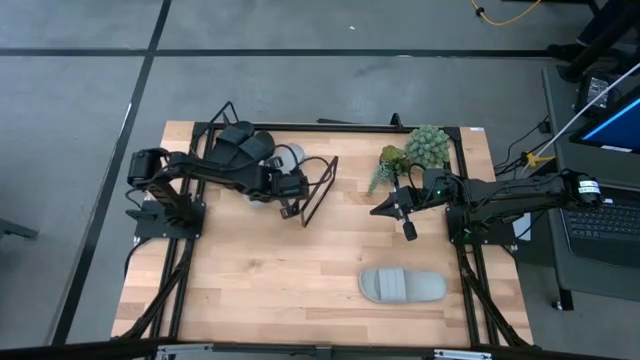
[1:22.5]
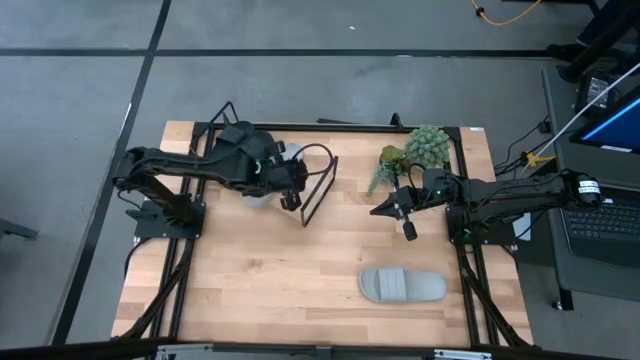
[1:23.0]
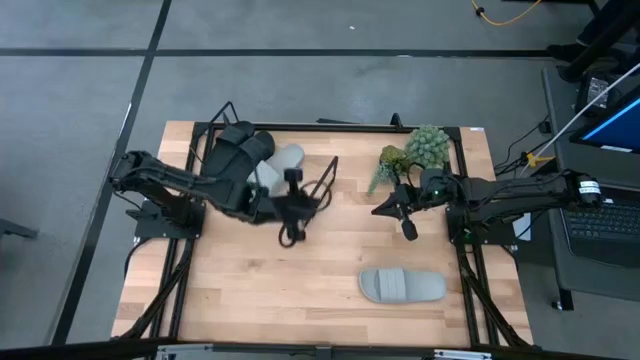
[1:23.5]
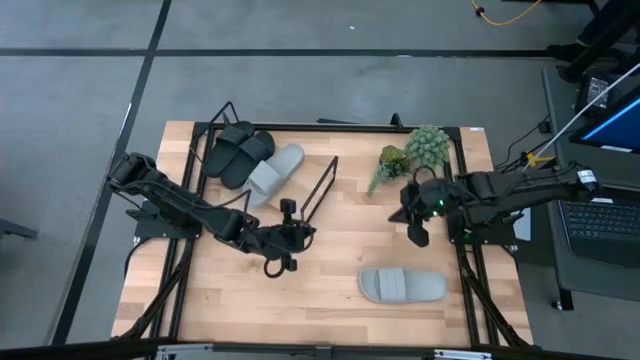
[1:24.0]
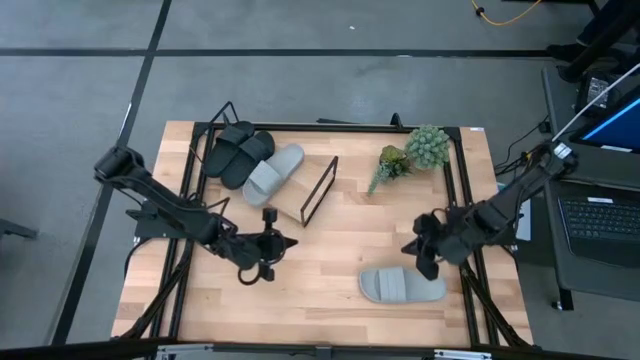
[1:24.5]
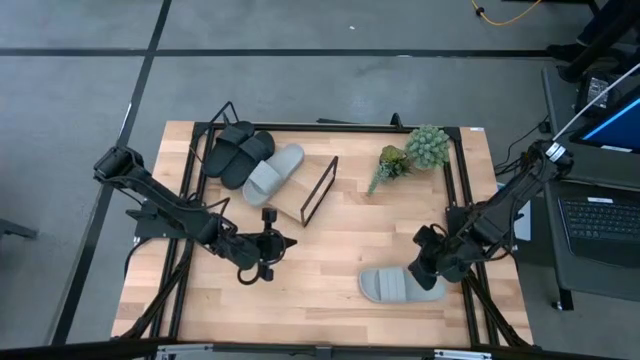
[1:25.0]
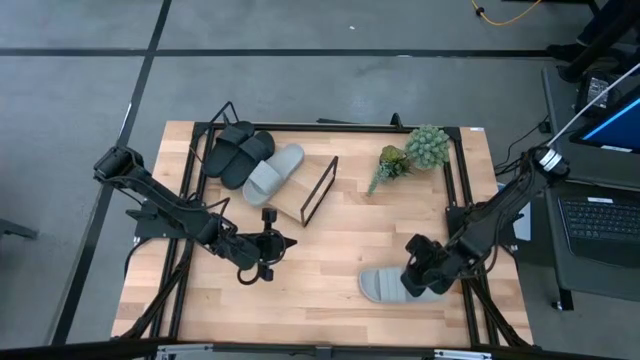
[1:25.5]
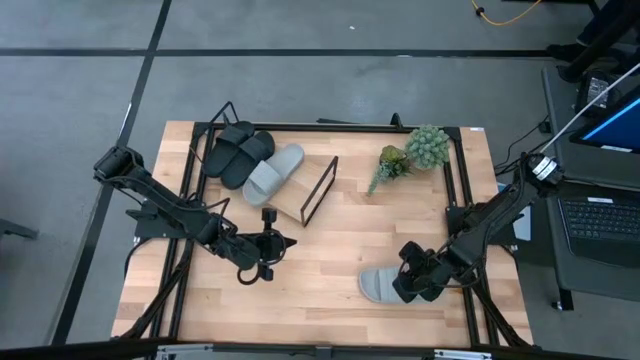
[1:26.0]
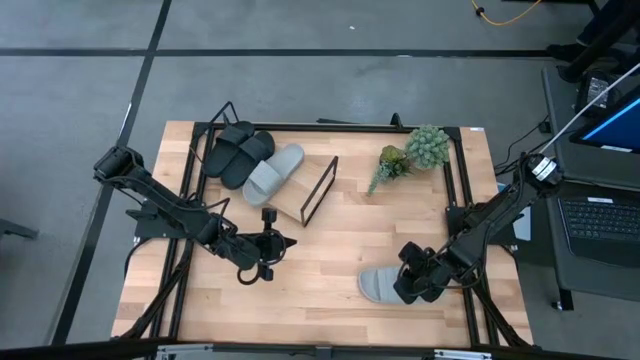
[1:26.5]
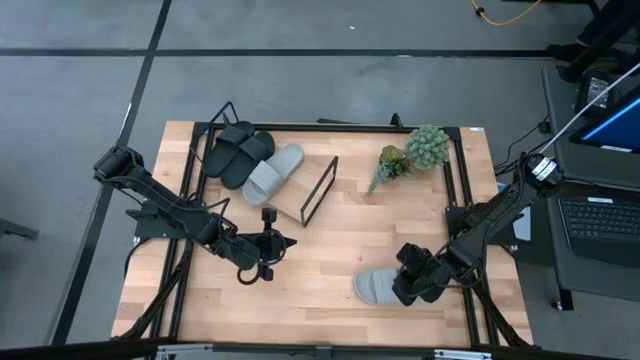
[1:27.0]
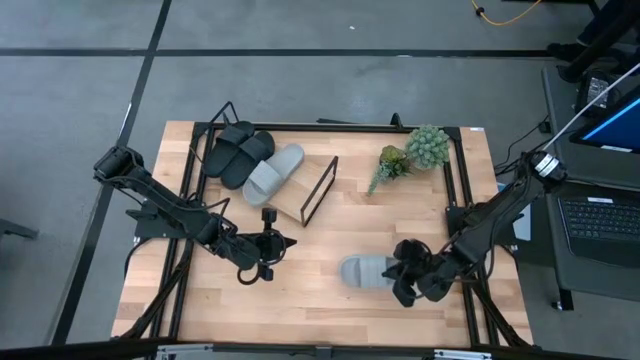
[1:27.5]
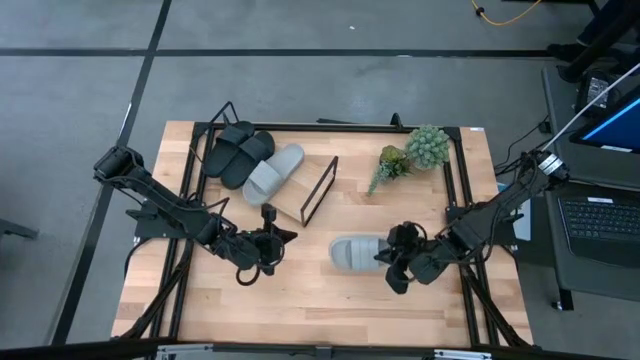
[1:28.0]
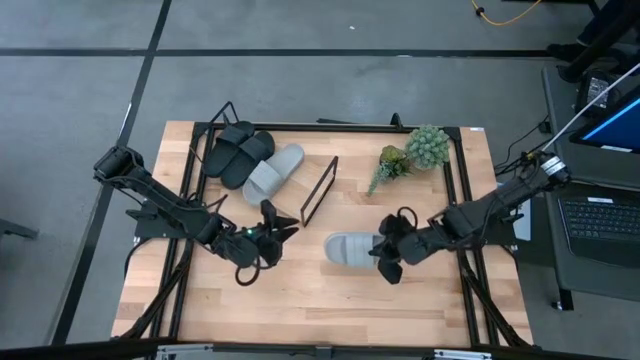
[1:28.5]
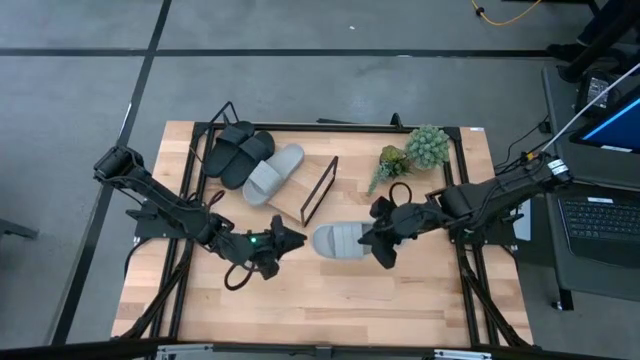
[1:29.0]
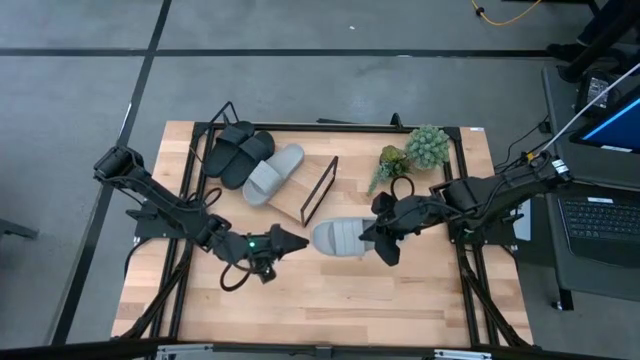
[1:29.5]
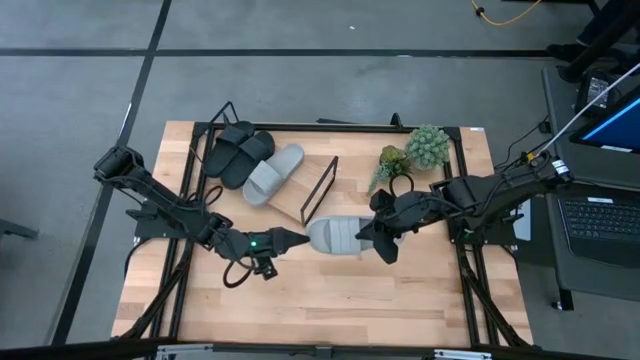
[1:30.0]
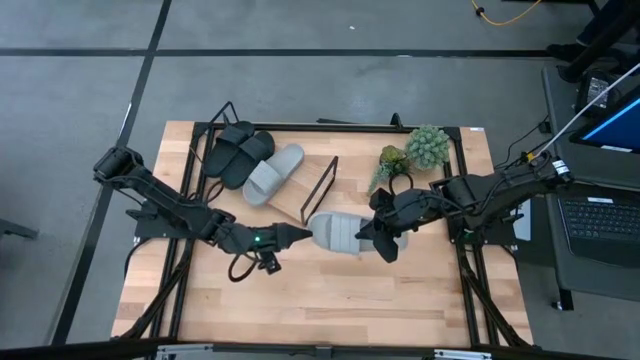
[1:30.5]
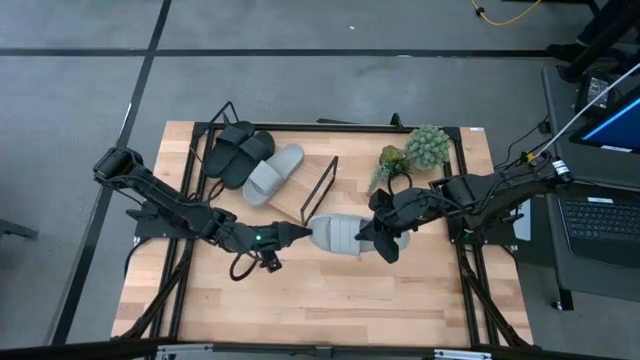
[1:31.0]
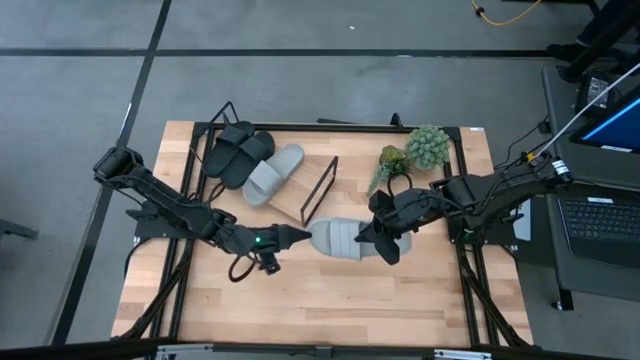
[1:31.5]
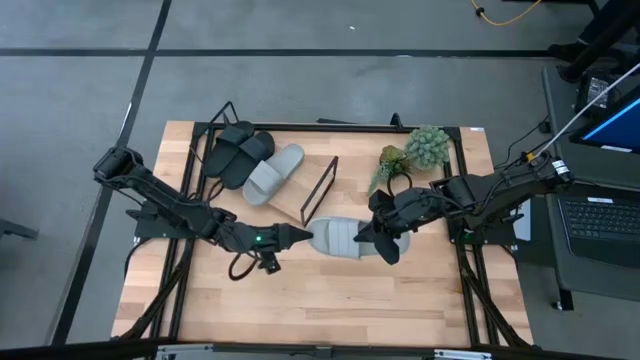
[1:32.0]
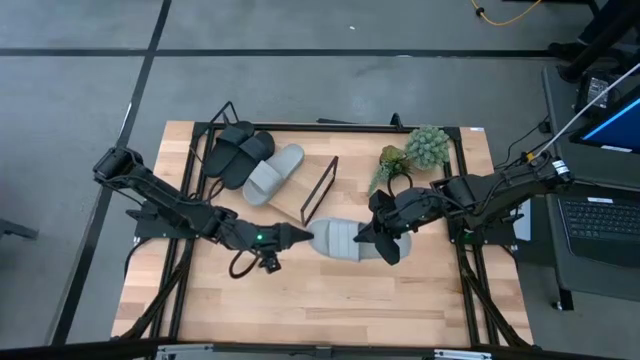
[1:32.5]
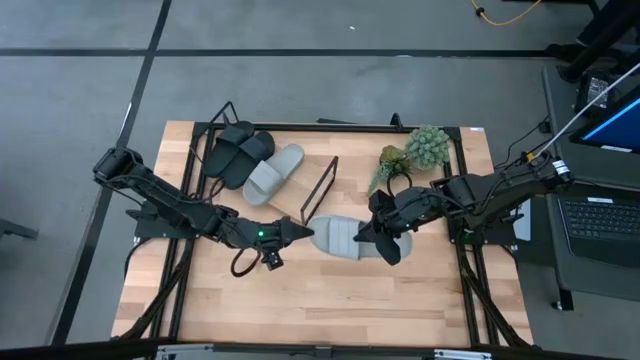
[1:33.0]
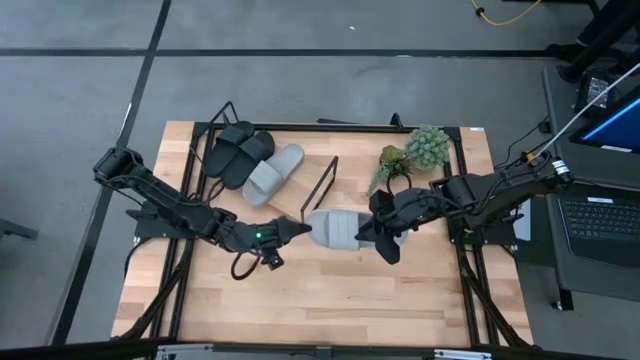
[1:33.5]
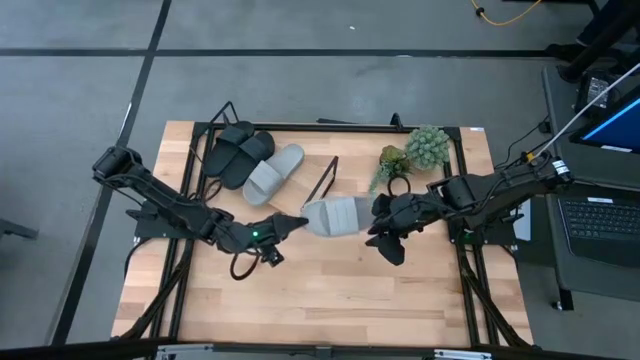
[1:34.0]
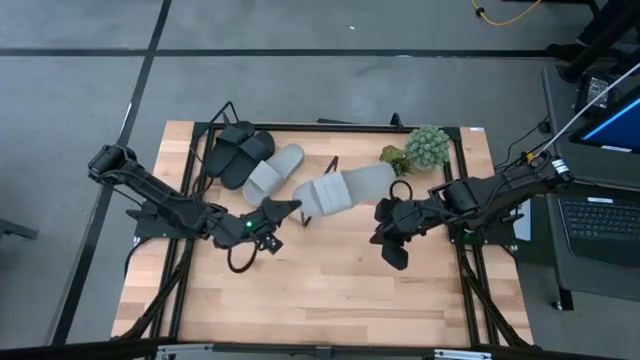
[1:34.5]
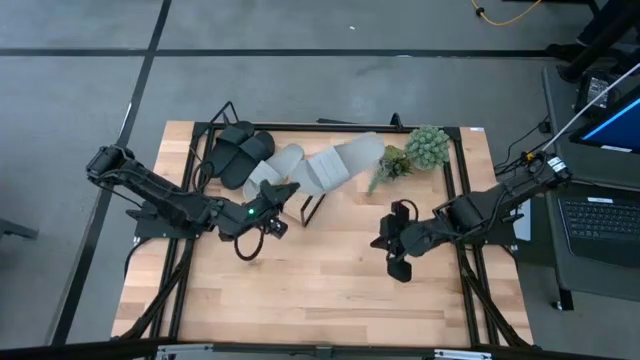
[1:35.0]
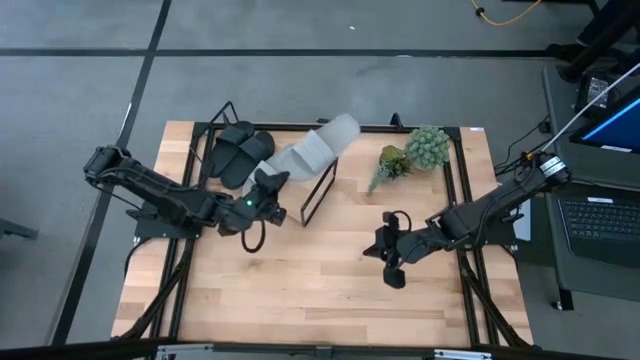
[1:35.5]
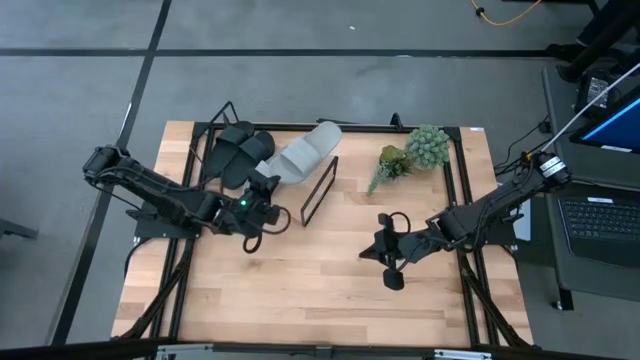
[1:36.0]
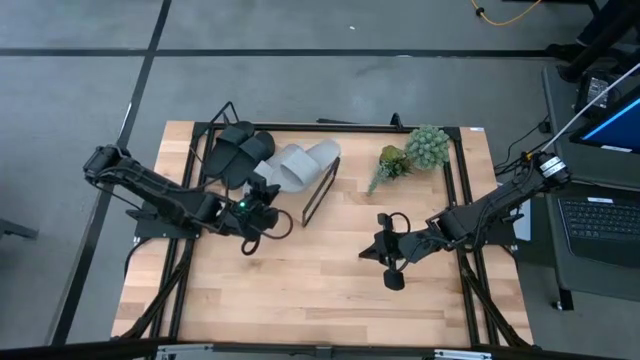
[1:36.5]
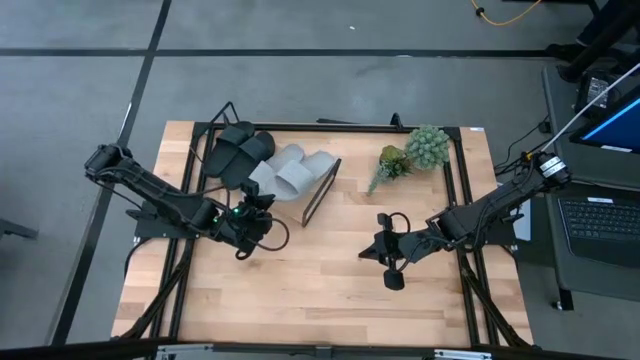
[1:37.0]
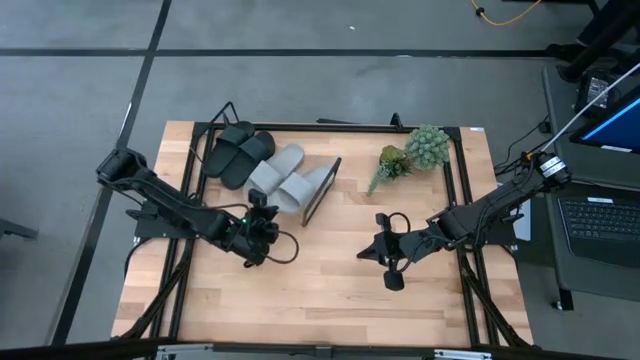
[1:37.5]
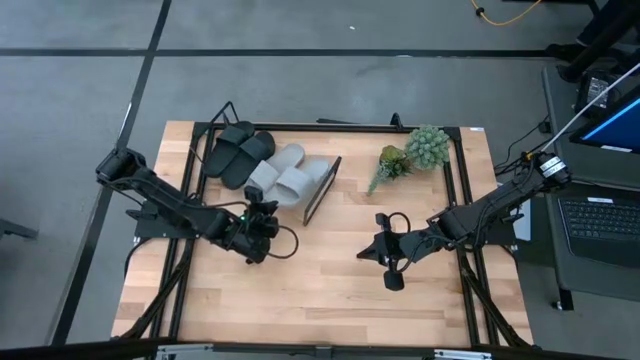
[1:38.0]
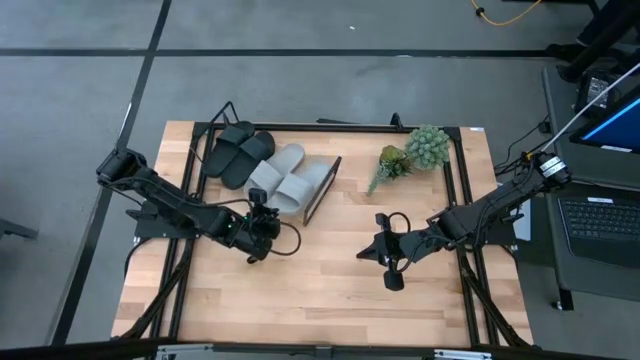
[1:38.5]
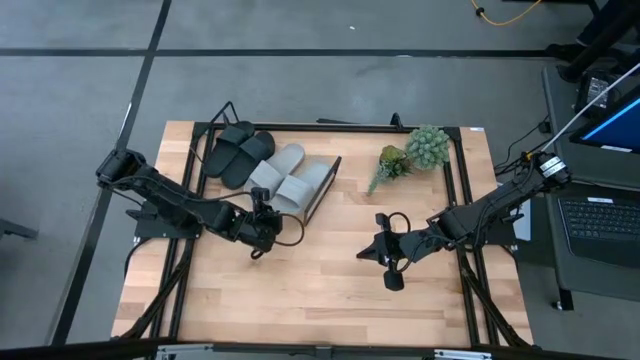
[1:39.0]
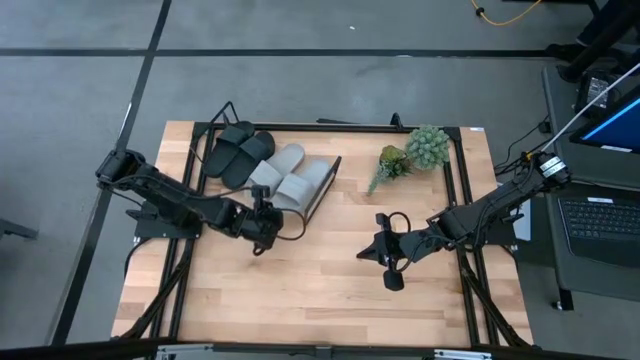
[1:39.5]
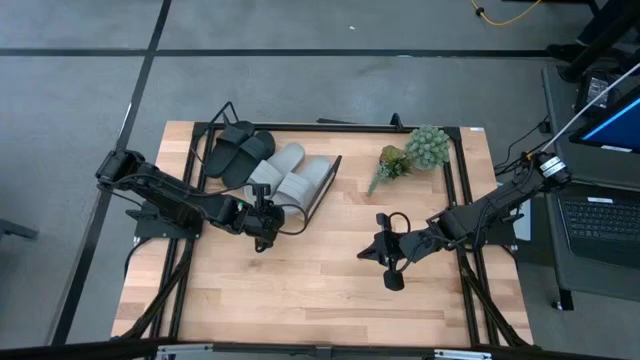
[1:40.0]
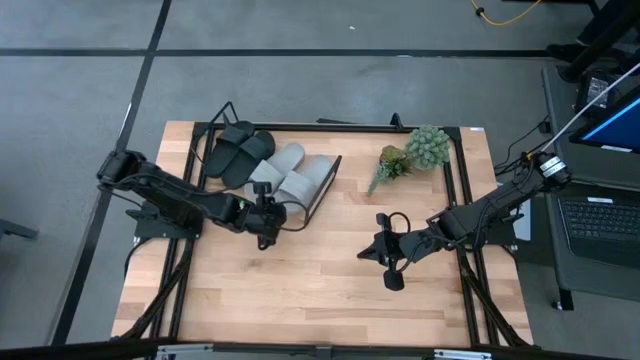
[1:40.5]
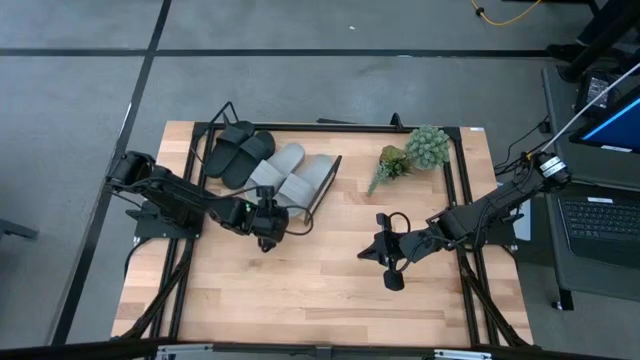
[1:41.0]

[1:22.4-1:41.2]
Task: Pick and place slides into the shelf
Put the gray slipper on the shelf

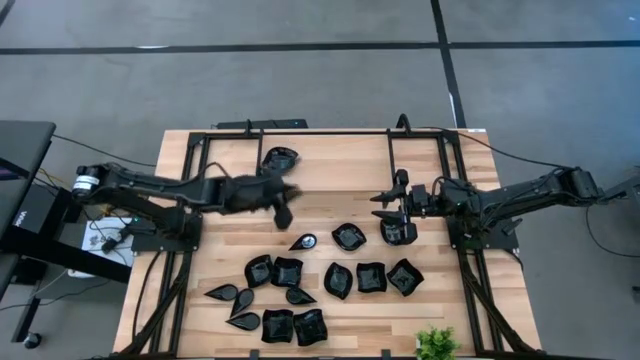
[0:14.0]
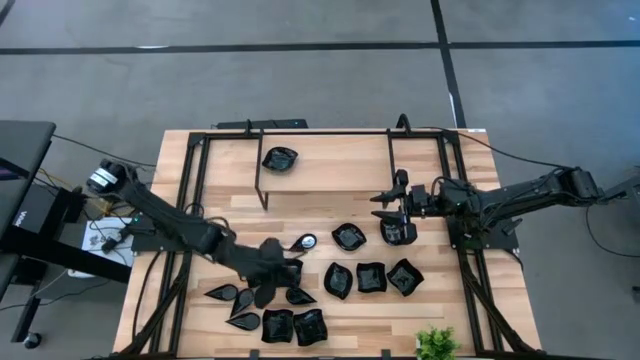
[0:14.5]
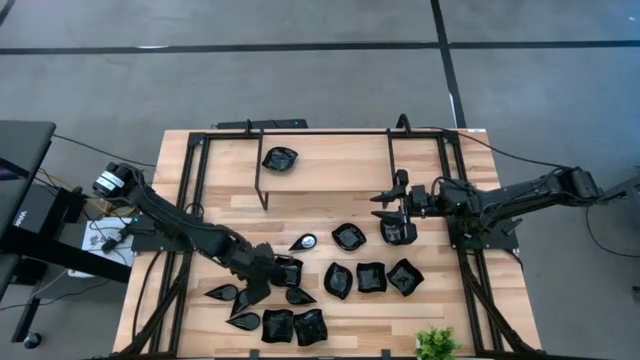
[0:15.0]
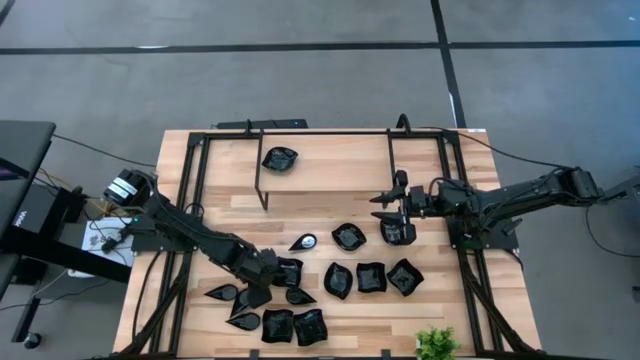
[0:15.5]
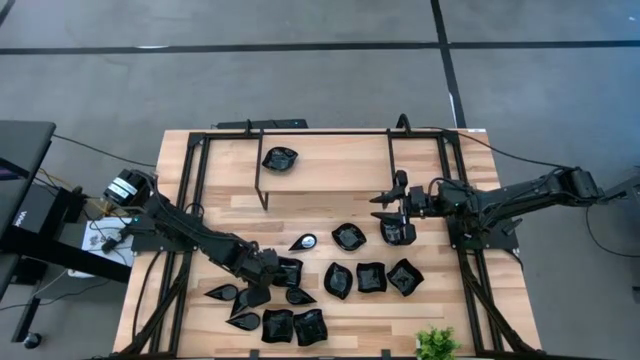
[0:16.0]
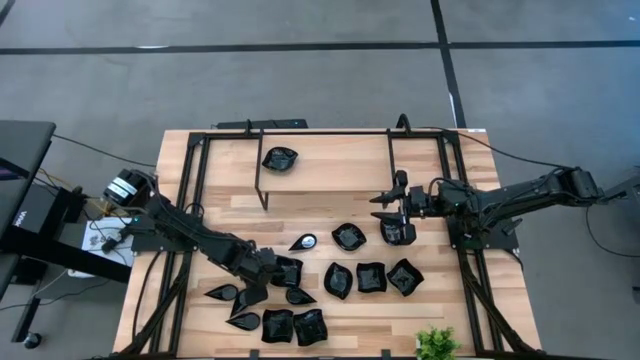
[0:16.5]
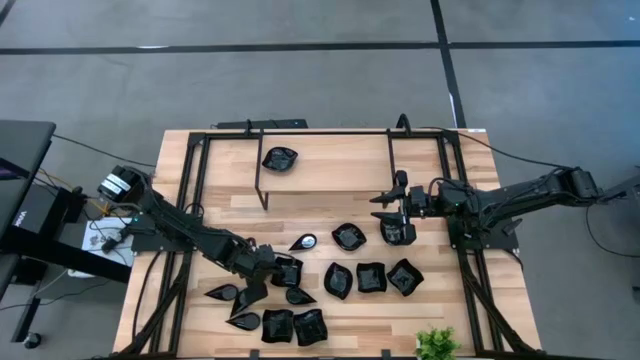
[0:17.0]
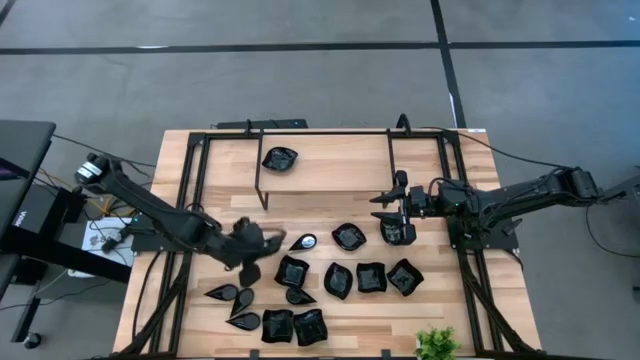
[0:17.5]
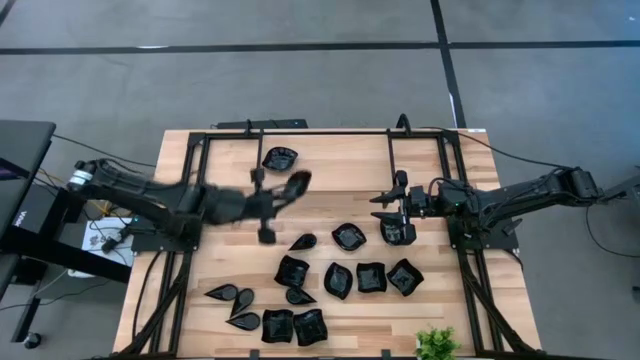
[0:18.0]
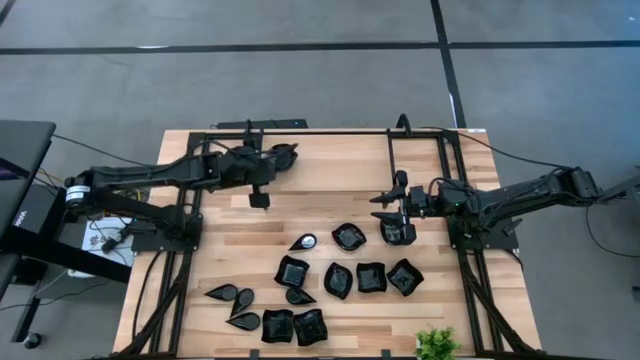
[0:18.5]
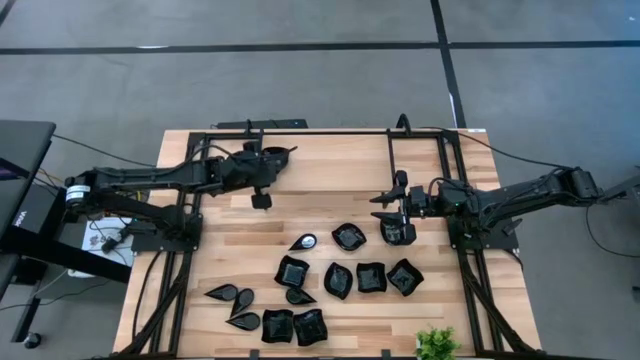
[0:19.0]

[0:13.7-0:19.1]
Task: Pick & Place Mini shaped plates
Stack the black leaf-shaped plate on top of the black leaf-shaped plate on the shelf
